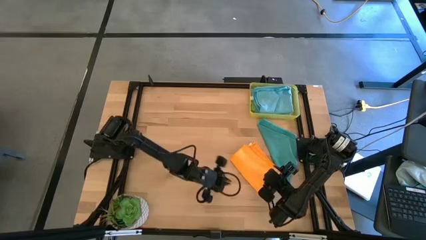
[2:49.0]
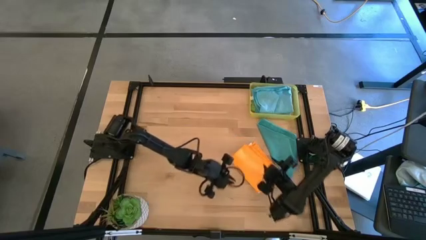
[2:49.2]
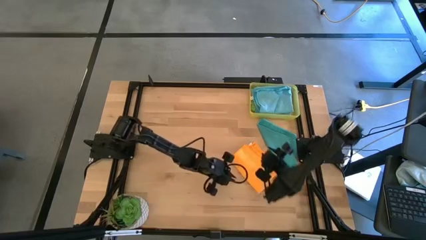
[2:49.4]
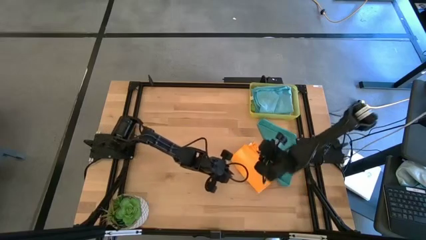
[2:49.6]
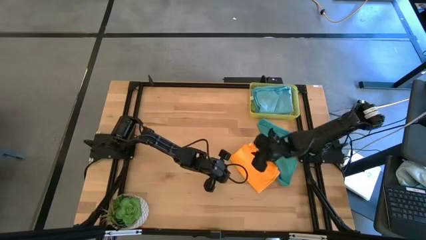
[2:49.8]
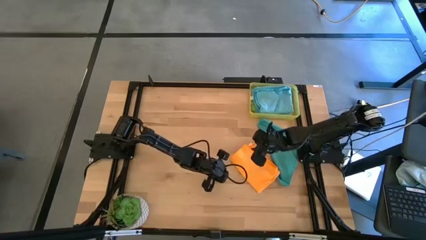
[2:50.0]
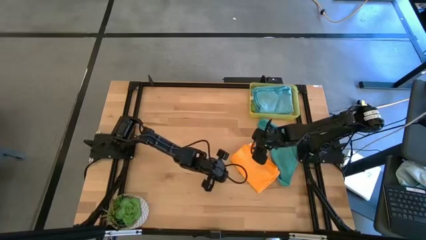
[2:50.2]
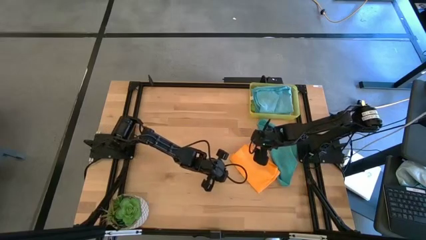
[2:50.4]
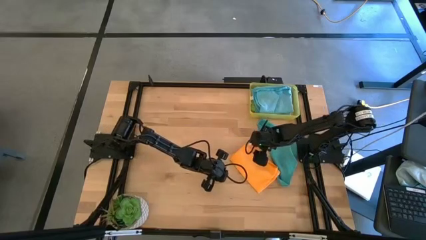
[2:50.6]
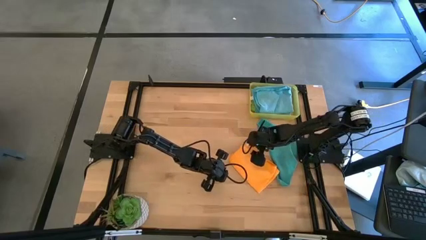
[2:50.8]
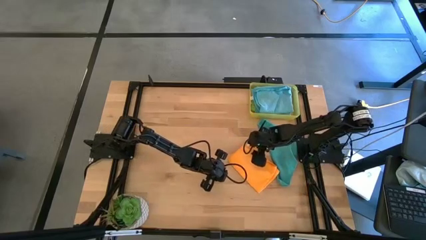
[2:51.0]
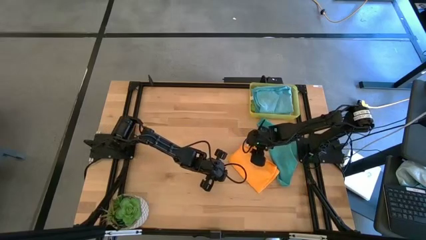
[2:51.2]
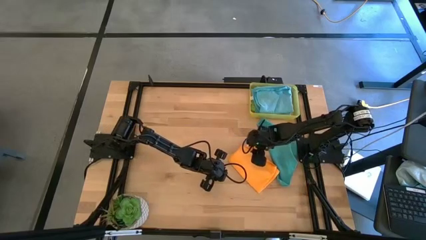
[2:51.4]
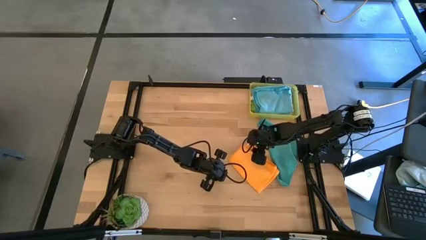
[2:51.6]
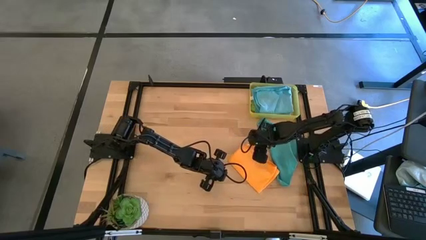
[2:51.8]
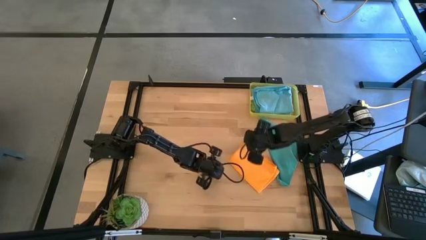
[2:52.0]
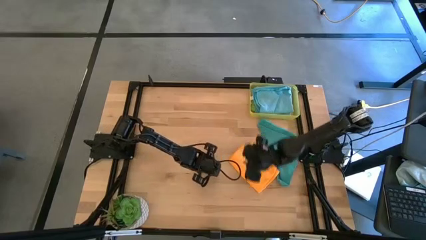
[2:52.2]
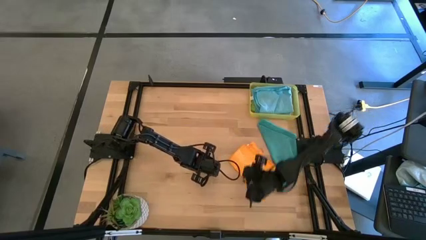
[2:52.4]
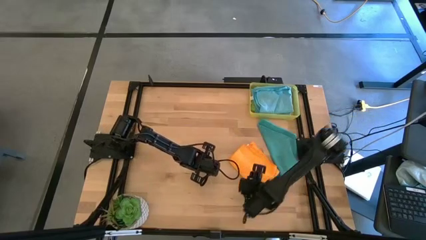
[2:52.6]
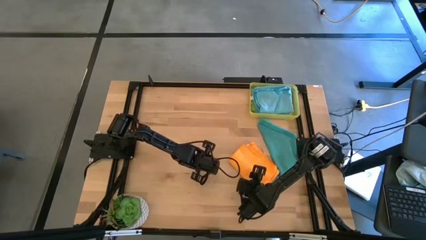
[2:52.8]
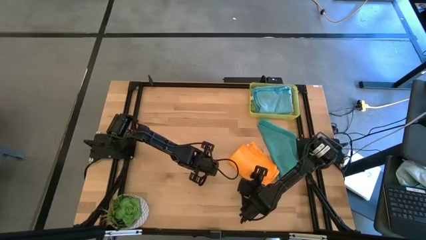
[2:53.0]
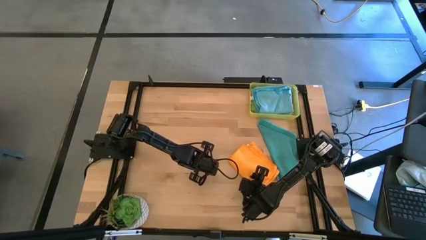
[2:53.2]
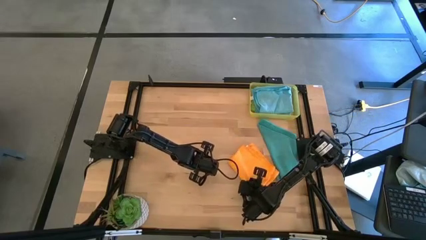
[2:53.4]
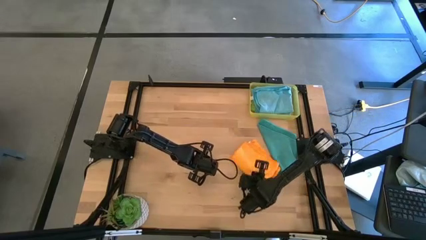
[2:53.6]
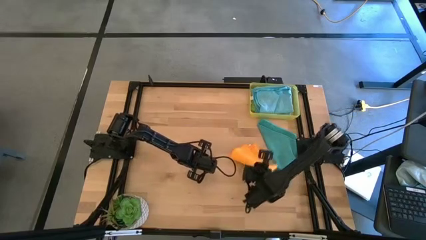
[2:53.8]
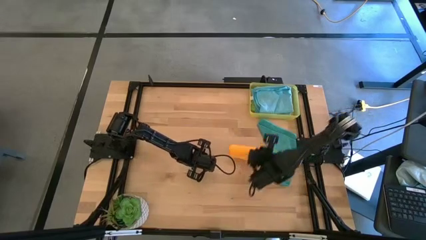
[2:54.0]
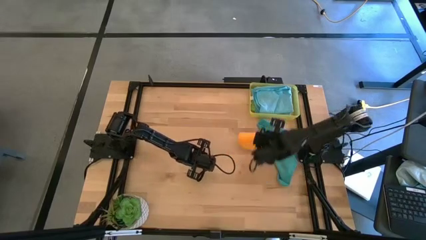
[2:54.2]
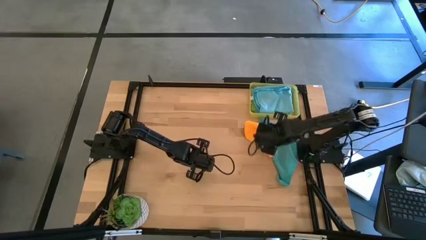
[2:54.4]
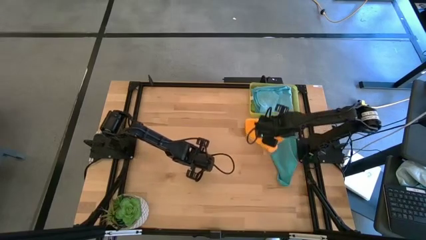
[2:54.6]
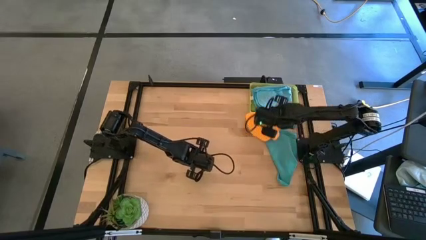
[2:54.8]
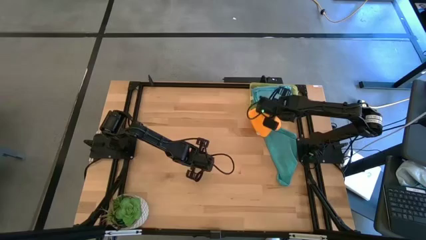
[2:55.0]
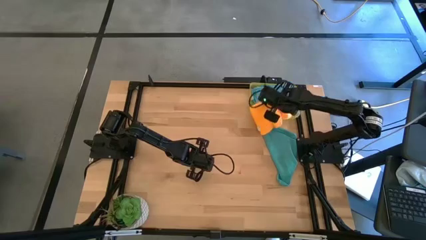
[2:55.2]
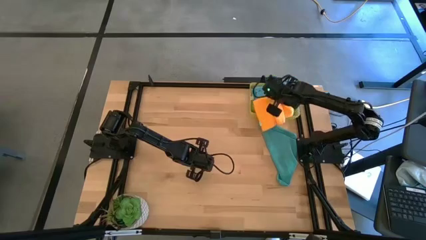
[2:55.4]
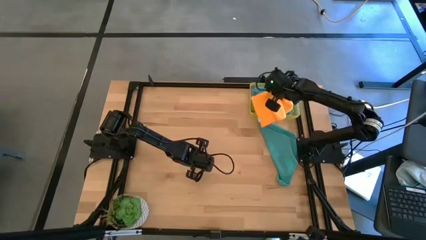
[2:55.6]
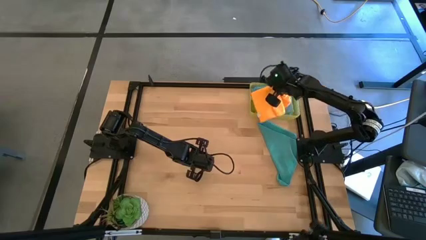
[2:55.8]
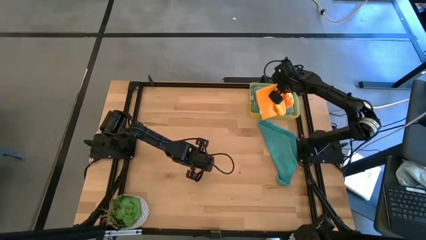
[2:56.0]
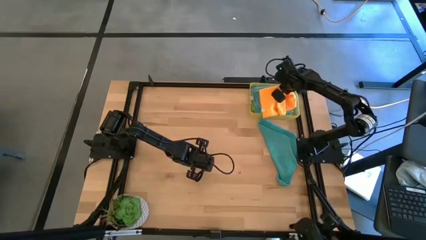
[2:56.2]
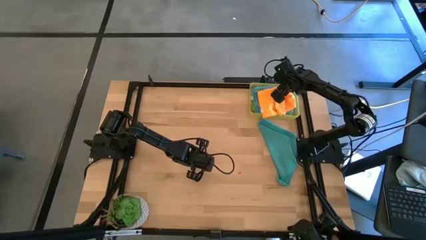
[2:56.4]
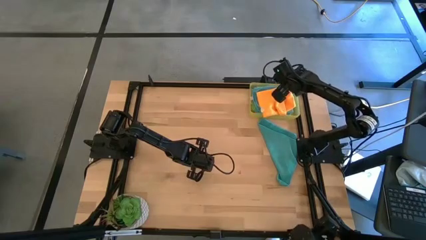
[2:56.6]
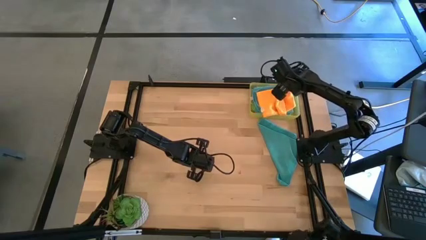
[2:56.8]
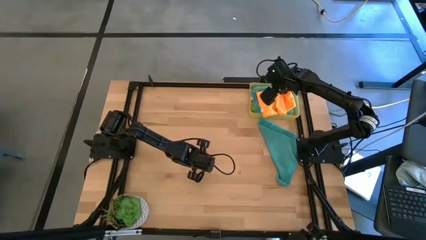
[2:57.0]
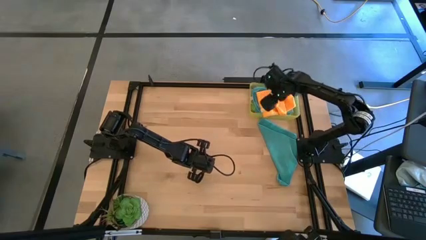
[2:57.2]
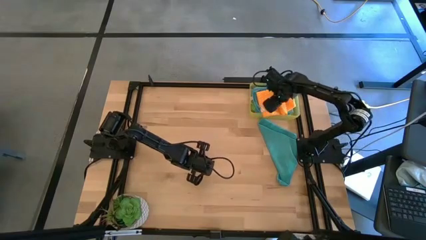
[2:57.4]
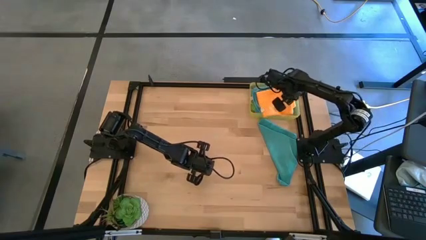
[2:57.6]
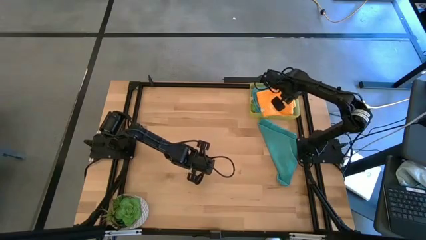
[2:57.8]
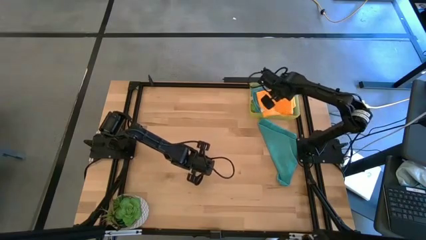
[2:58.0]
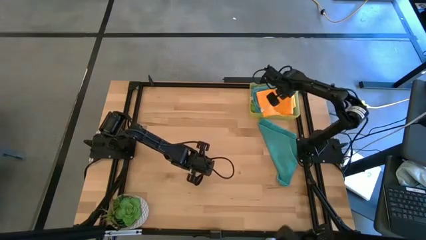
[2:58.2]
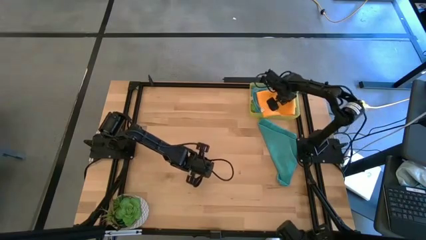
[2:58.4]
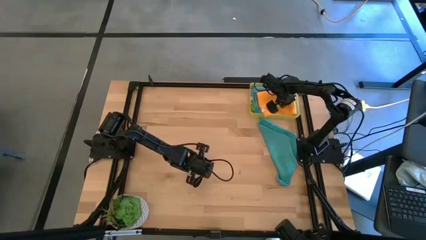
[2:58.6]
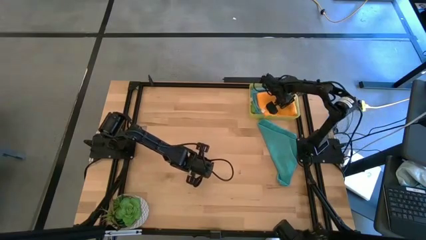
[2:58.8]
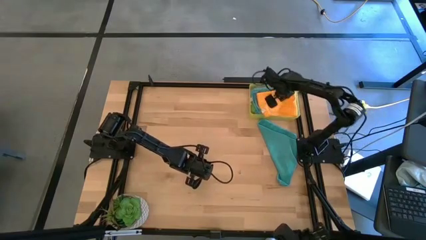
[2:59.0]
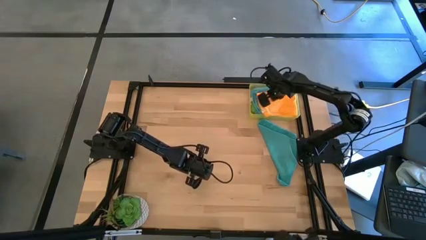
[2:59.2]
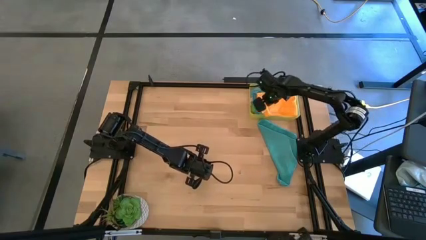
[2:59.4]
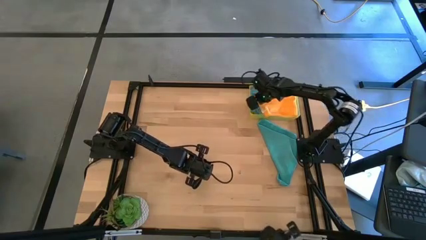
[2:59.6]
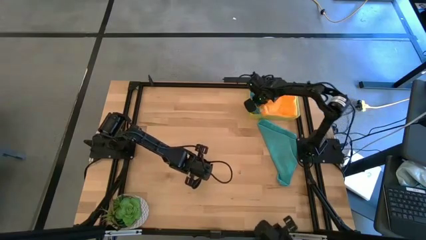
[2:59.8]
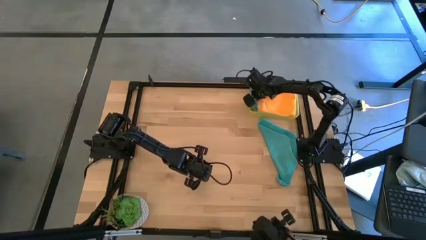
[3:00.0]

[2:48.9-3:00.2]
Task: Fold microfiber towels
Put the folded yellow microfiber cloth into the yellow bin

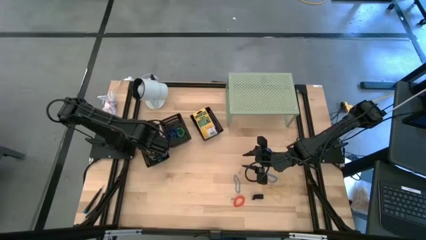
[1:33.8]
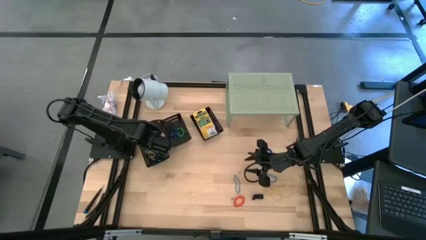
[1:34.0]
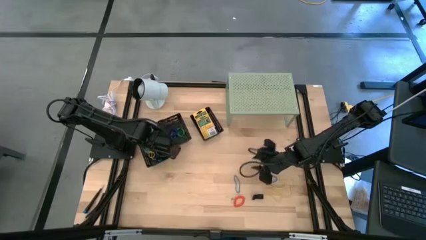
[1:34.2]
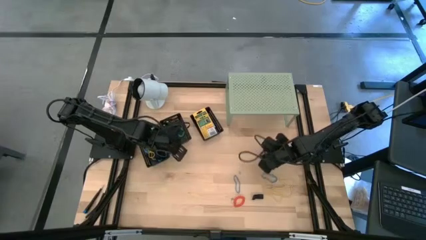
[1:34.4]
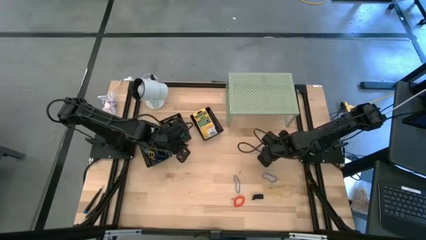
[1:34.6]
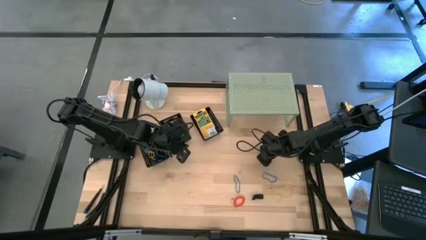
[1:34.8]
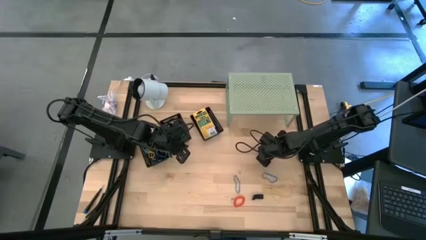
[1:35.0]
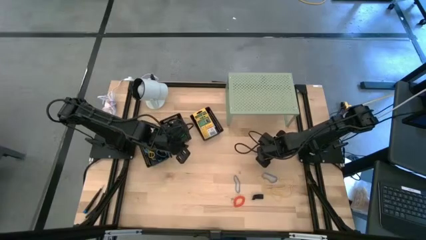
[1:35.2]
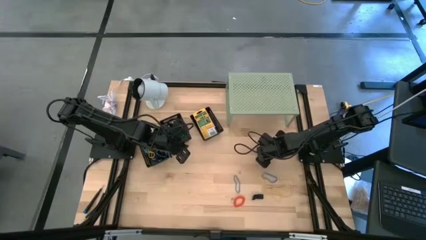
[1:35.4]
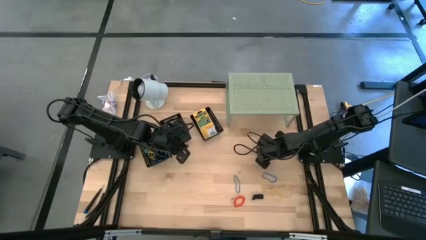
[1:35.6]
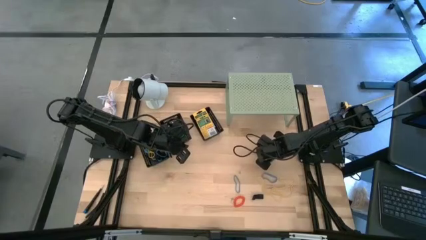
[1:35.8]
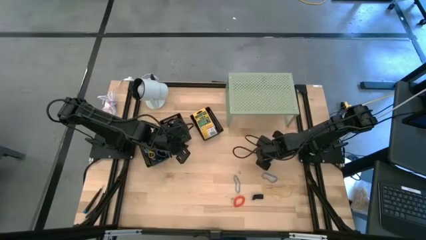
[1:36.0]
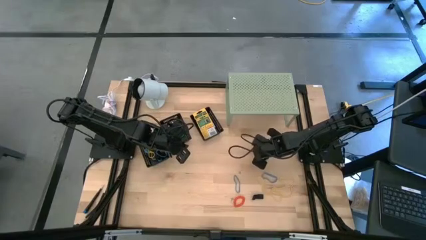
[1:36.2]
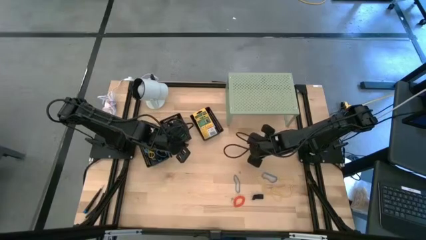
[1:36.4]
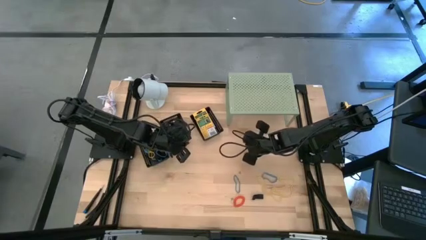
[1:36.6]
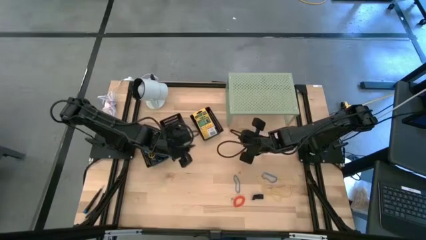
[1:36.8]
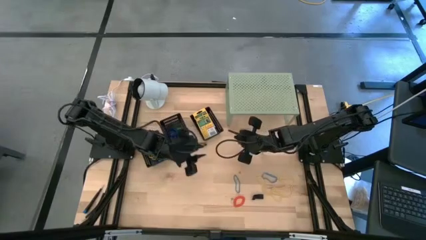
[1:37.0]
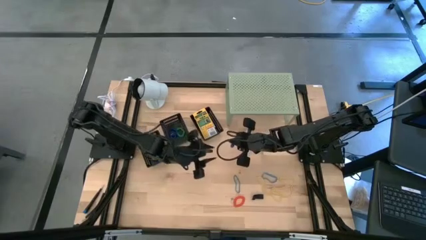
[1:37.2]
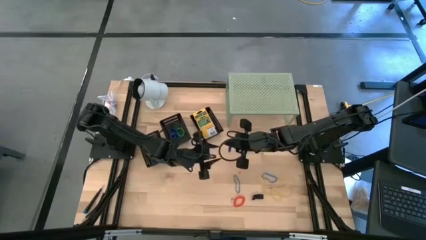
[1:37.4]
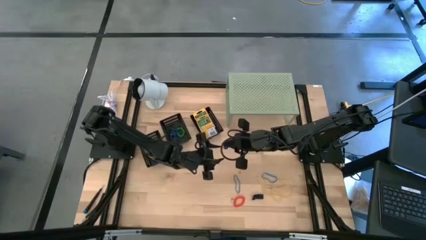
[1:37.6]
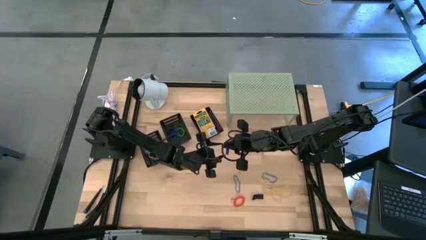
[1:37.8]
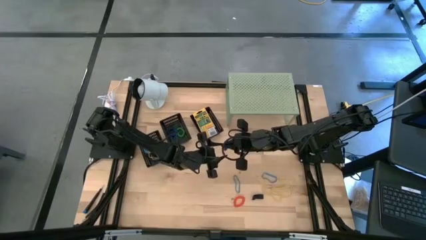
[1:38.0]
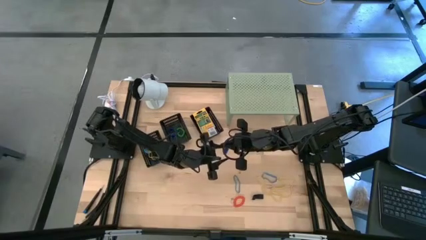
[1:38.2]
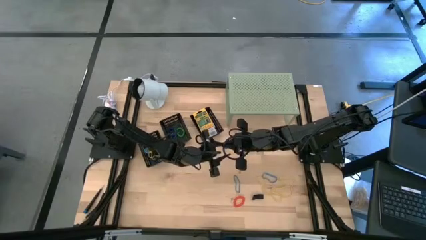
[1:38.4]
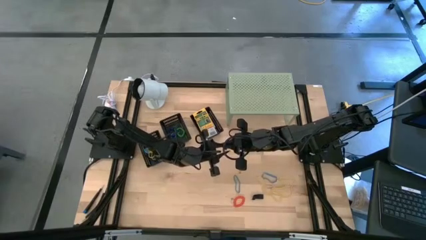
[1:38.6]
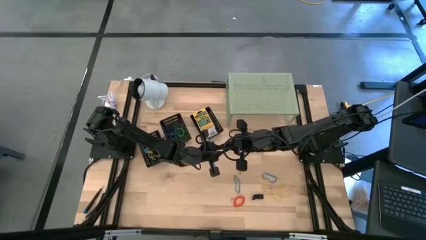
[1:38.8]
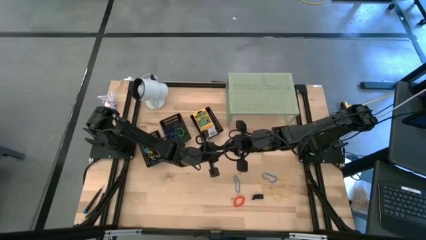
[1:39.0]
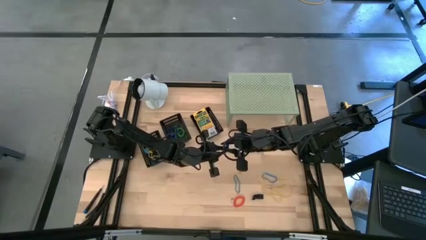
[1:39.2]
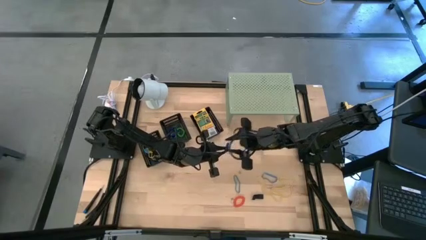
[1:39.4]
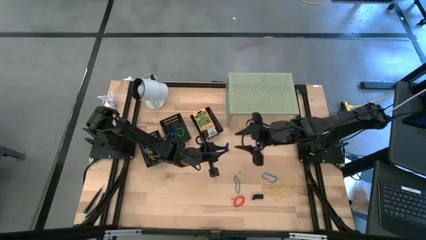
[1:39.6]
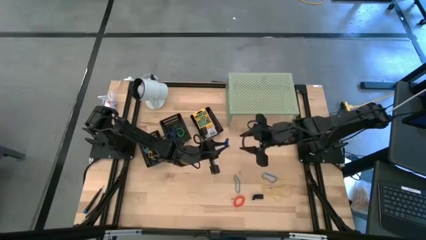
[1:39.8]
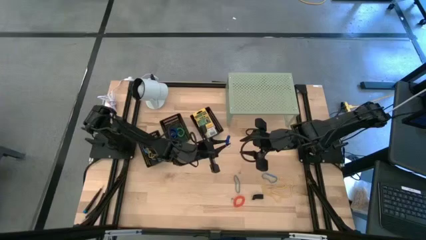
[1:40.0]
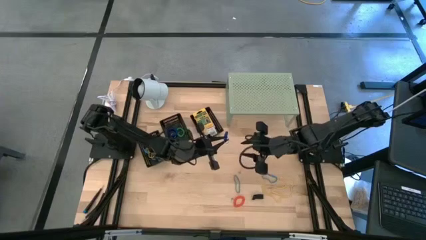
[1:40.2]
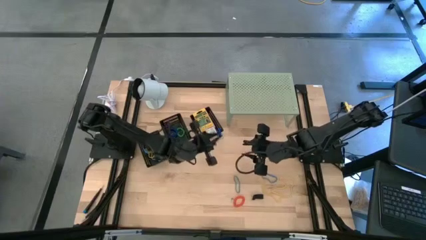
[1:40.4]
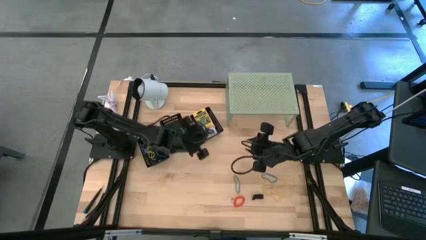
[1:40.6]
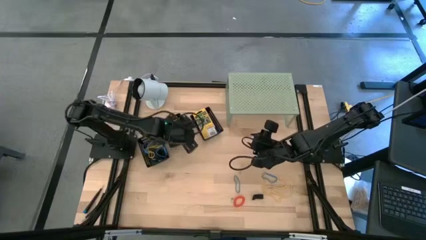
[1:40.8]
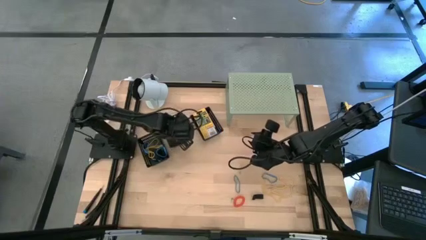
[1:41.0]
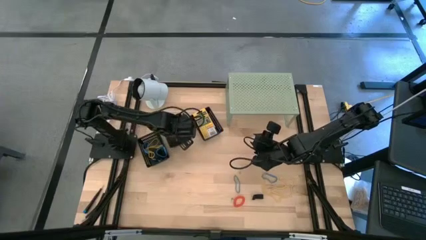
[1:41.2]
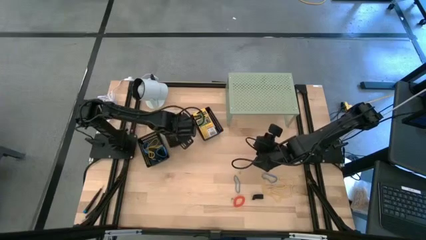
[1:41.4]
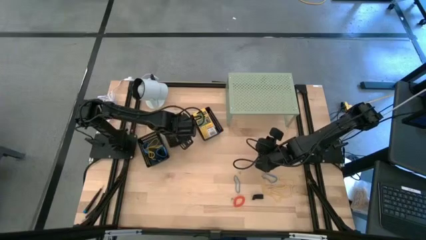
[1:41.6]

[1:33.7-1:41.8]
Task: Pick & Place Office Desk Supplies
Put the blue spring keychain into the middle black basket
